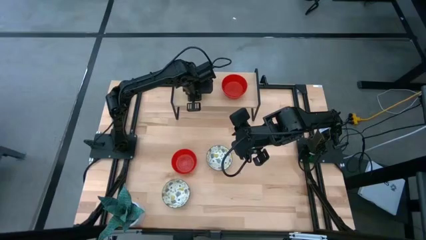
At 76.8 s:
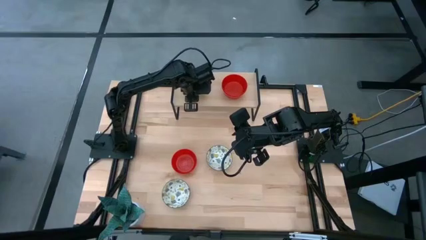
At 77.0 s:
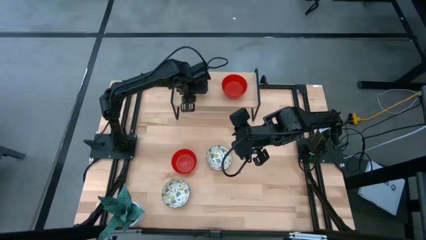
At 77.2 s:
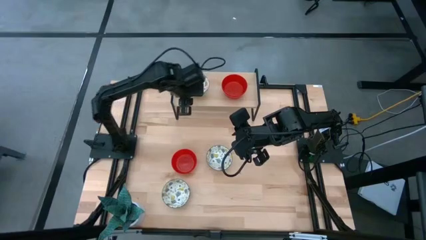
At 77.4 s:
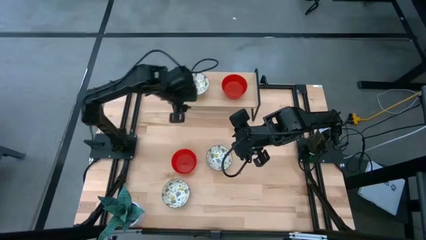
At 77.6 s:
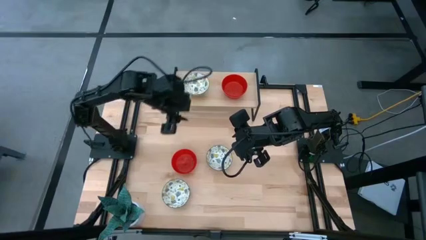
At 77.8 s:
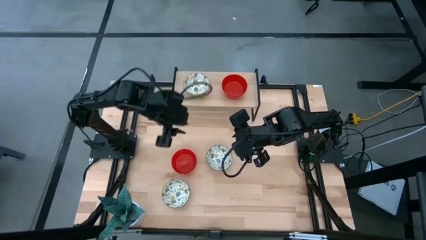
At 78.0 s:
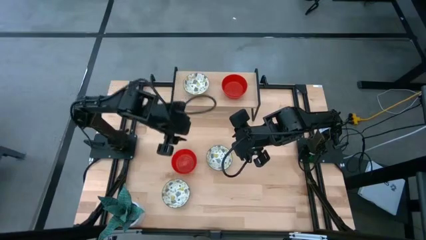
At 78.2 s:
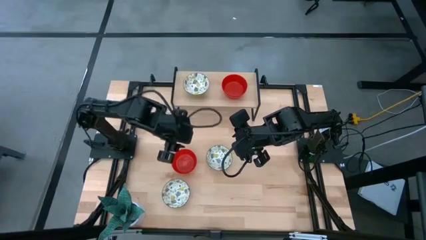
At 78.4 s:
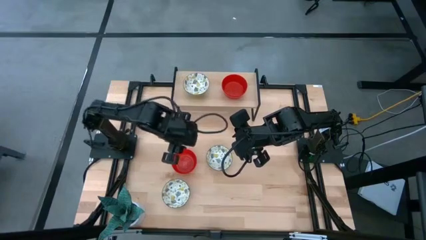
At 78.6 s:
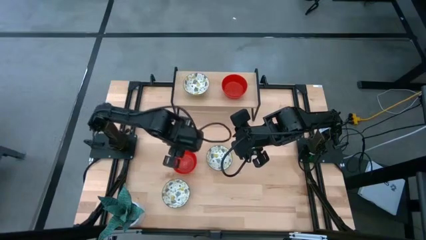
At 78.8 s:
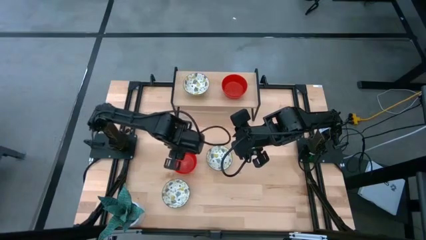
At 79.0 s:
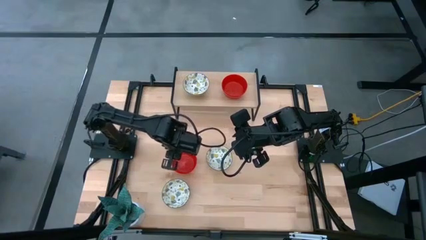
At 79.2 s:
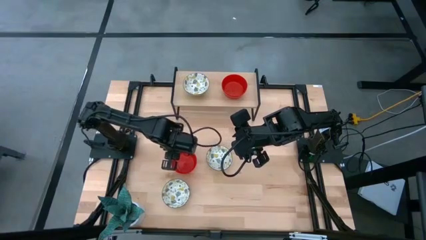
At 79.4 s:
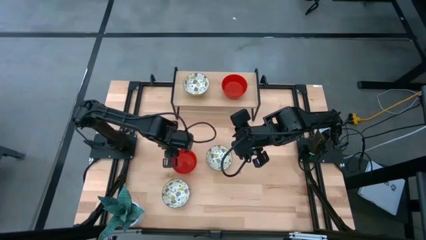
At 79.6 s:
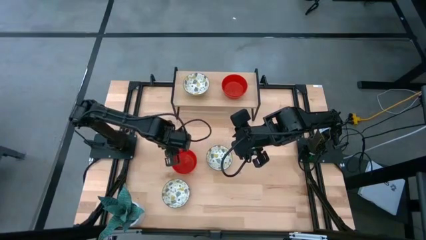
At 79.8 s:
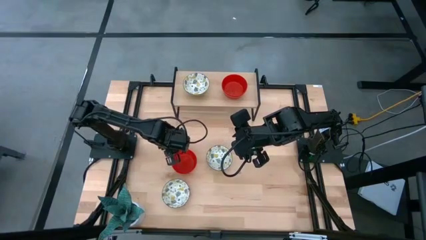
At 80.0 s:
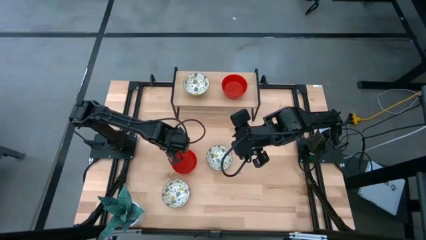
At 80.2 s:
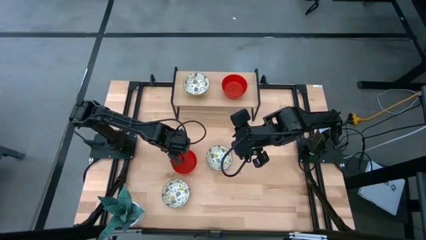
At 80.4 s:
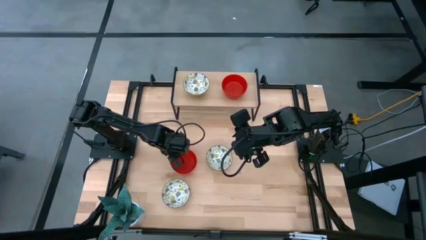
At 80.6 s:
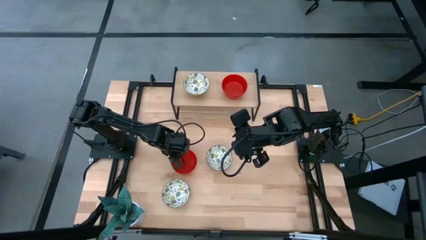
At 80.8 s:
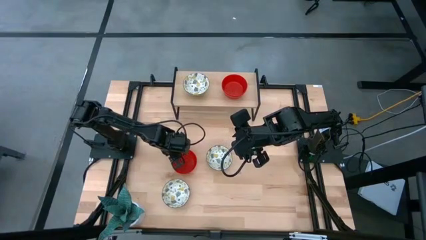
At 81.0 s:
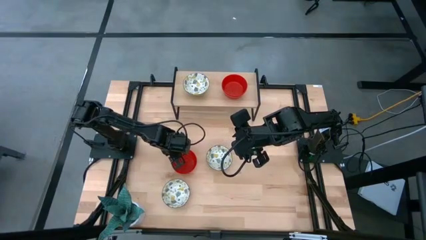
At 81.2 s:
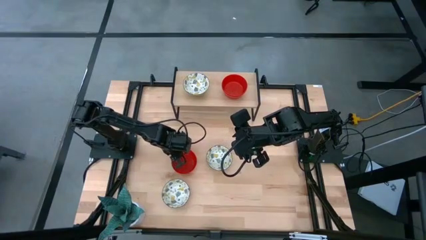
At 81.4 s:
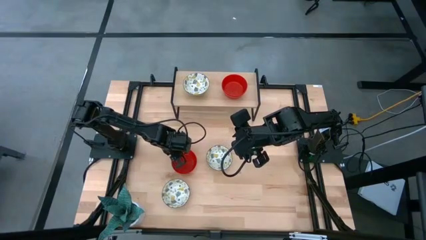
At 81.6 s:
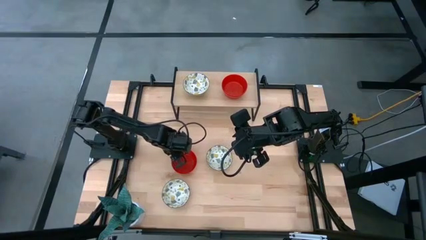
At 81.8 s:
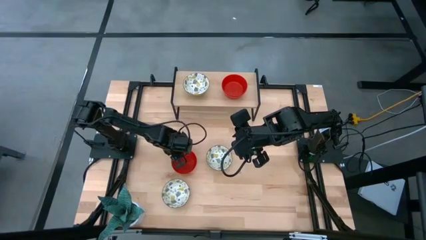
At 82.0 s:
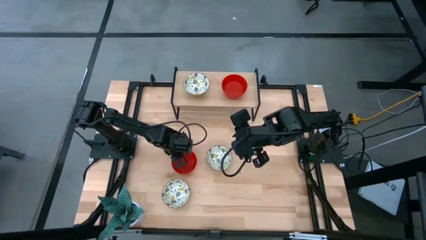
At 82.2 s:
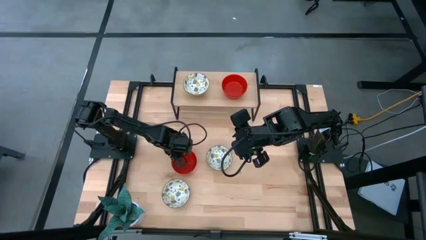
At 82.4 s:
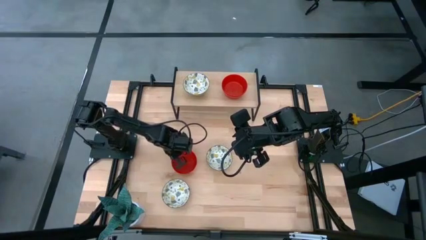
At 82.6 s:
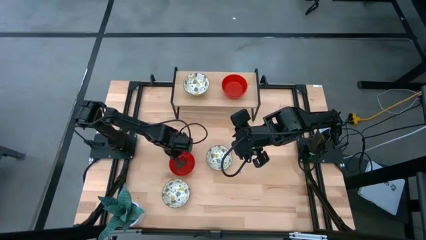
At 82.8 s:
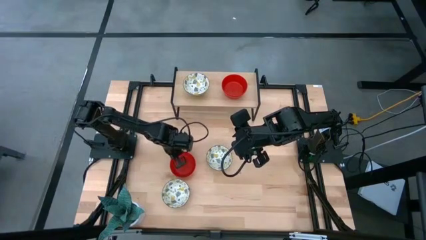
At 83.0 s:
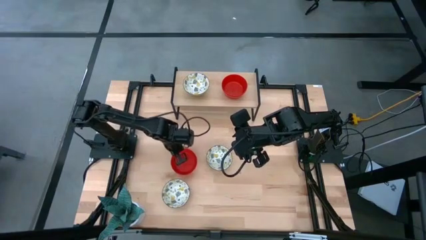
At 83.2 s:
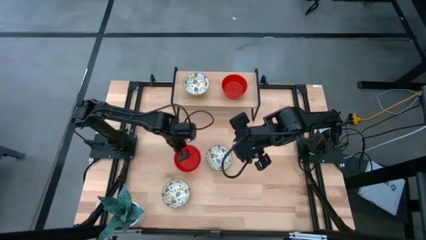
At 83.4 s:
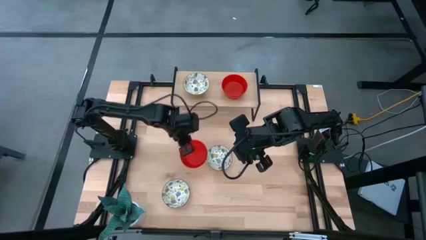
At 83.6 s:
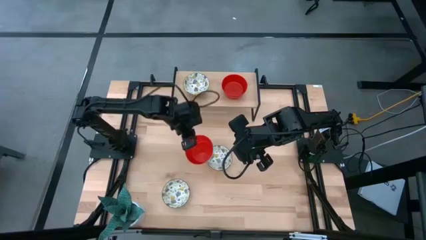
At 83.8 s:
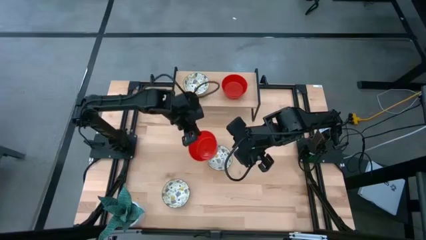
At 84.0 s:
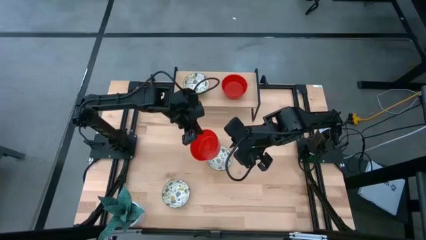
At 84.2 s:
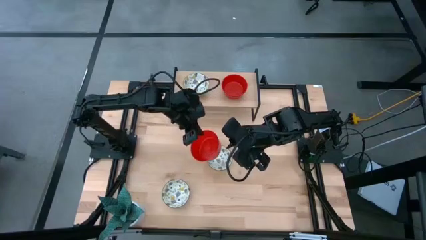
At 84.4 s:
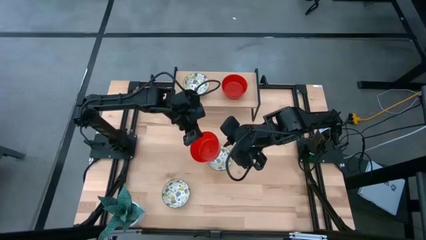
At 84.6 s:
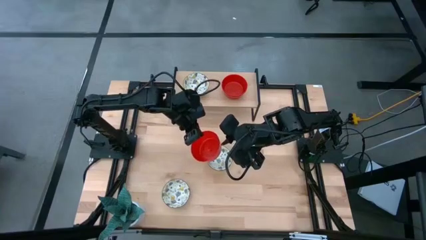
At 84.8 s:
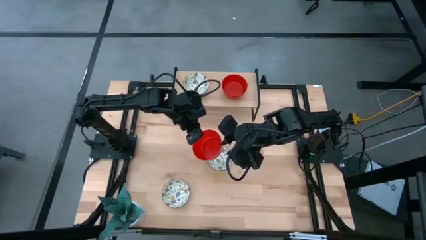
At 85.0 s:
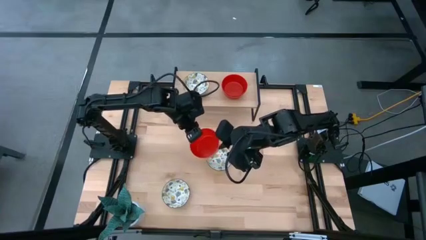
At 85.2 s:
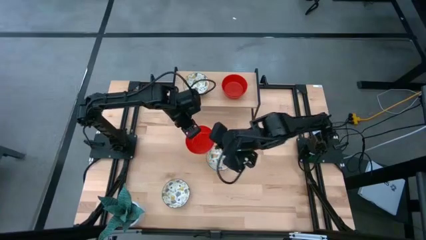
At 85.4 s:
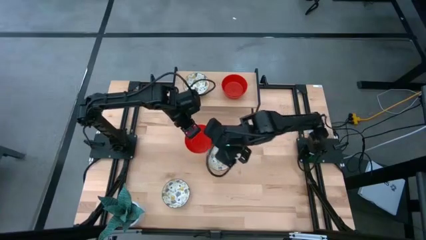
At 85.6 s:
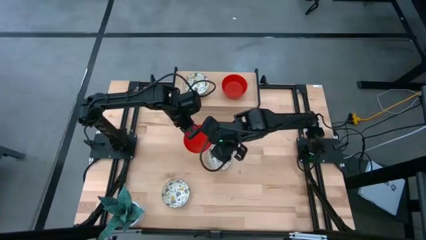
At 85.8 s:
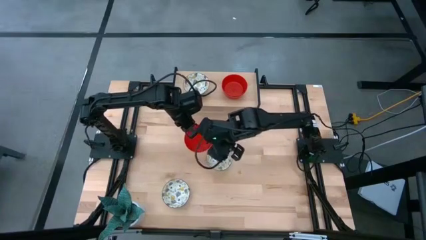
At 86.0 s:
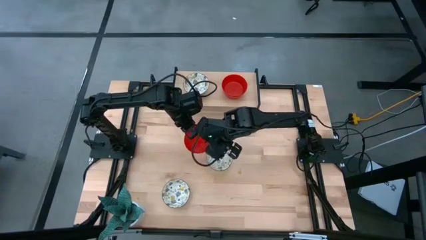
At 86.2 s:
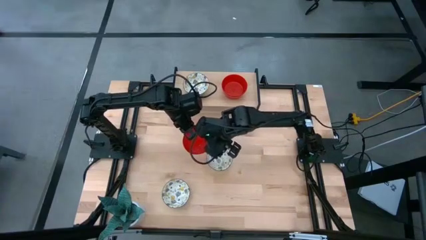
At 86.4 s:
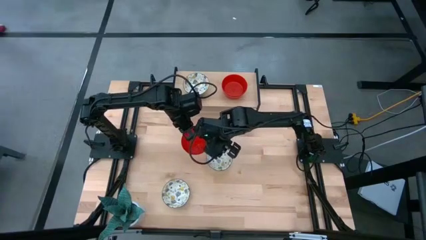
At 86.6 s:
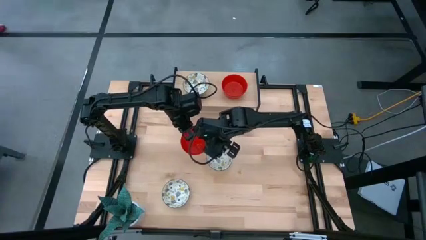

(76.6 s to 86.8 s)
Task: Pick & Place Mini bowls
Stack the red bowl on top of the red bowl on the shelf
